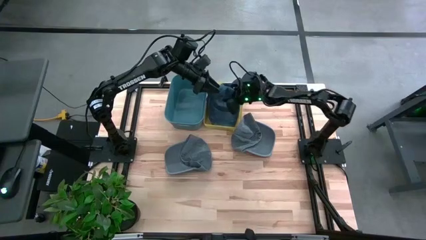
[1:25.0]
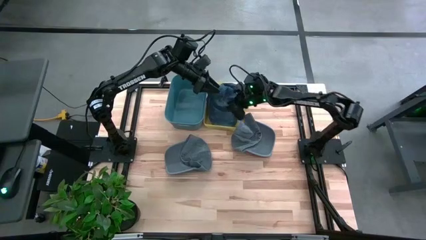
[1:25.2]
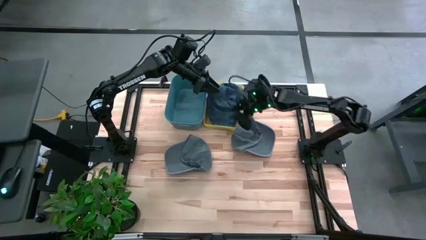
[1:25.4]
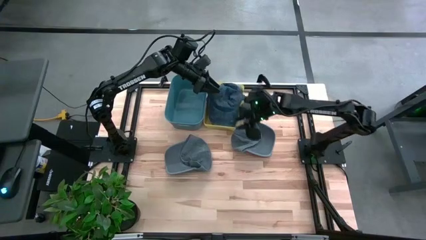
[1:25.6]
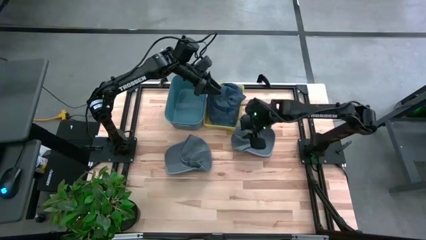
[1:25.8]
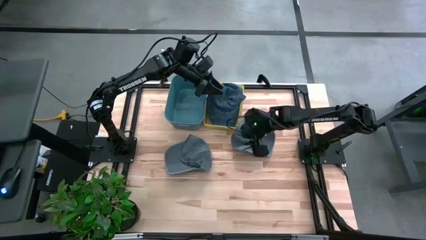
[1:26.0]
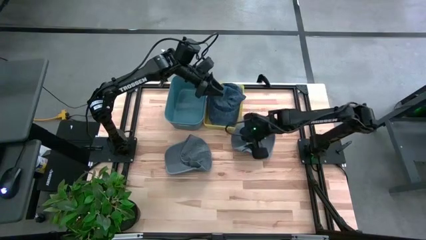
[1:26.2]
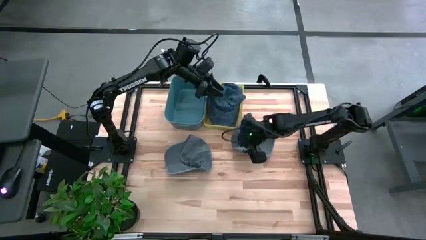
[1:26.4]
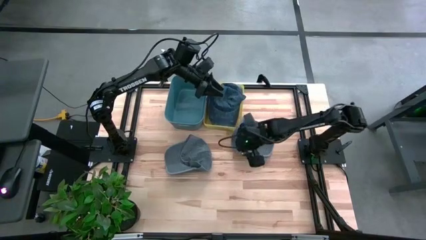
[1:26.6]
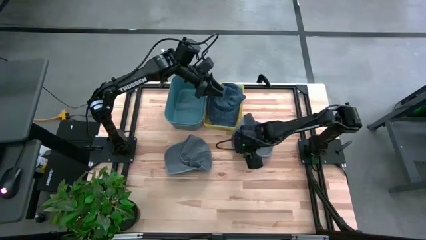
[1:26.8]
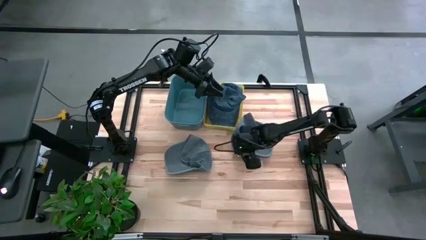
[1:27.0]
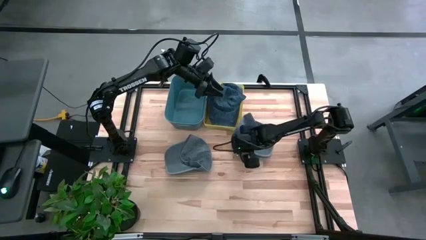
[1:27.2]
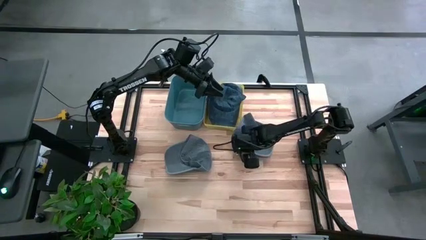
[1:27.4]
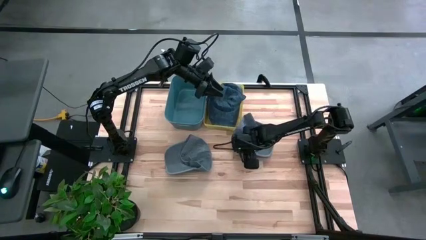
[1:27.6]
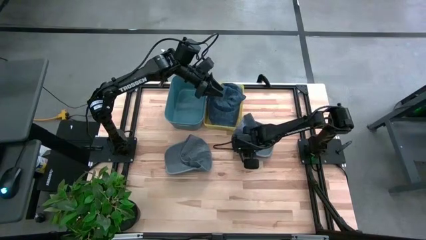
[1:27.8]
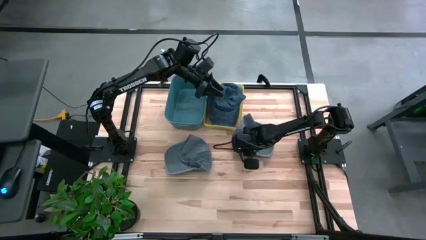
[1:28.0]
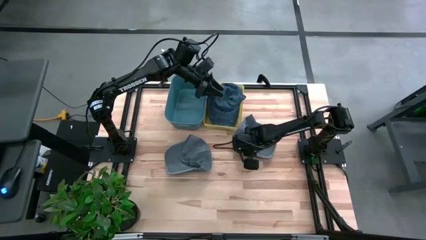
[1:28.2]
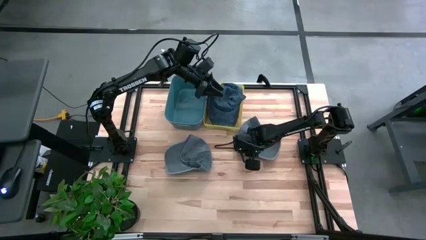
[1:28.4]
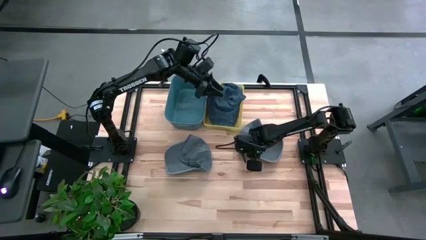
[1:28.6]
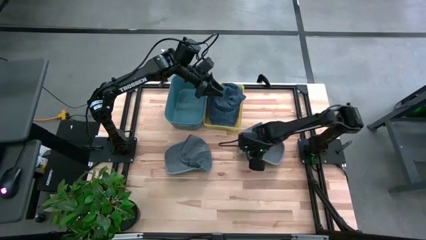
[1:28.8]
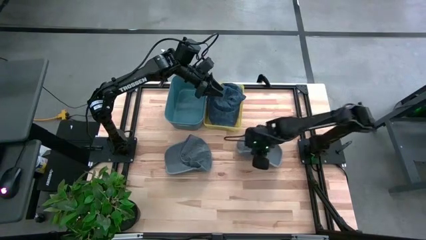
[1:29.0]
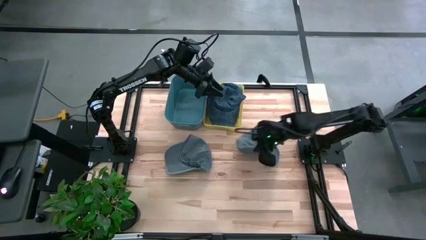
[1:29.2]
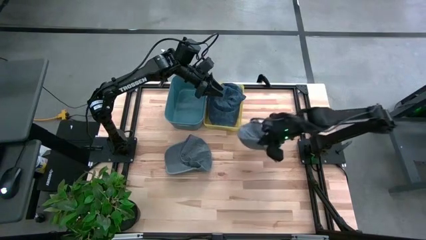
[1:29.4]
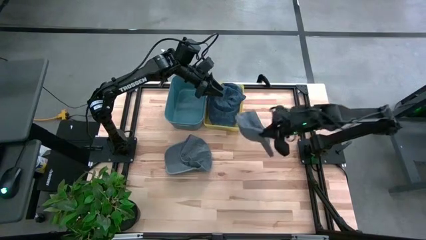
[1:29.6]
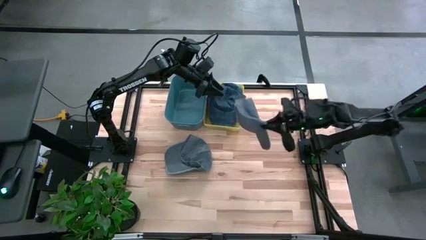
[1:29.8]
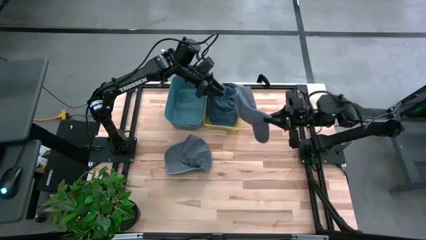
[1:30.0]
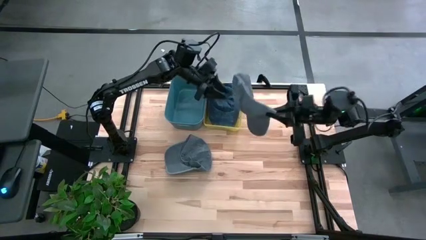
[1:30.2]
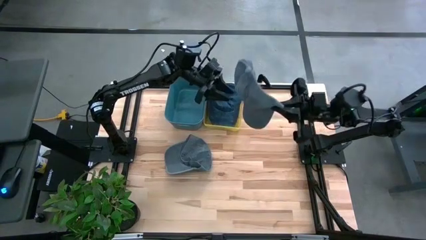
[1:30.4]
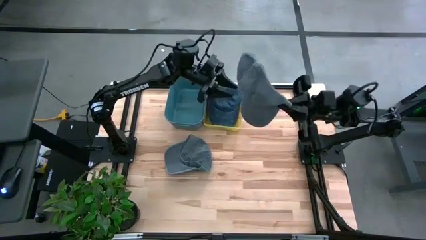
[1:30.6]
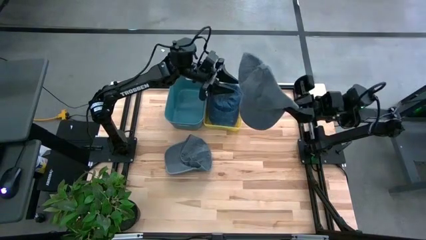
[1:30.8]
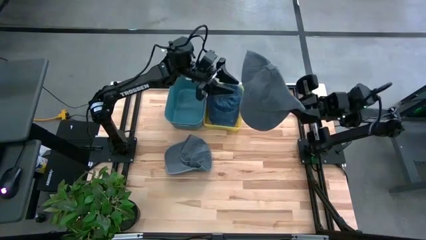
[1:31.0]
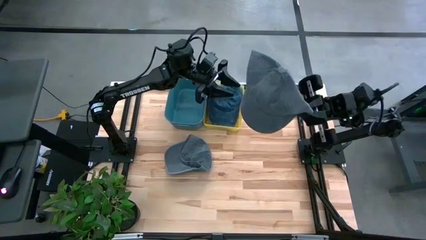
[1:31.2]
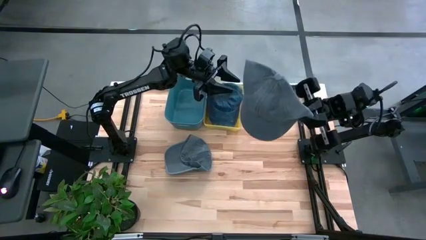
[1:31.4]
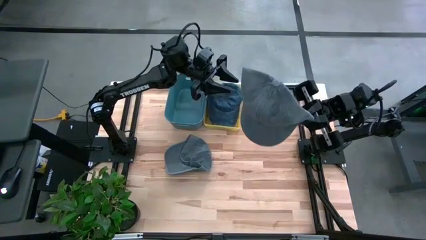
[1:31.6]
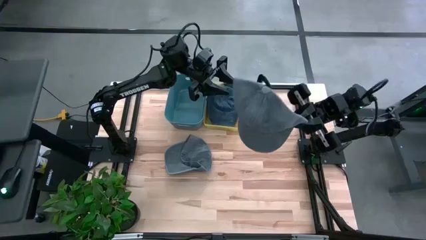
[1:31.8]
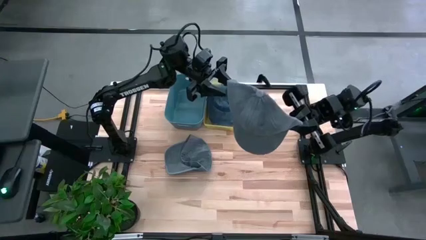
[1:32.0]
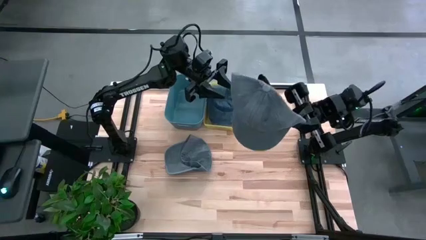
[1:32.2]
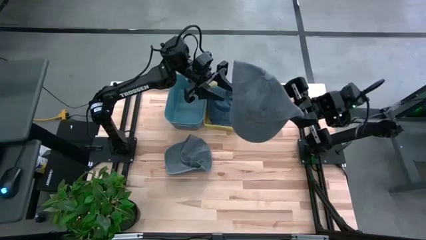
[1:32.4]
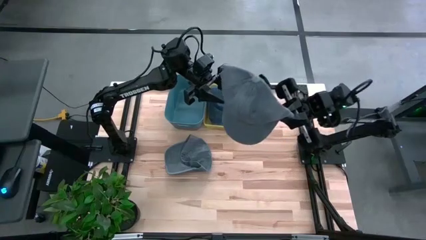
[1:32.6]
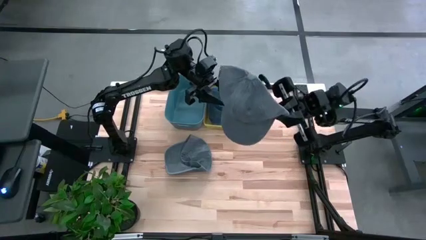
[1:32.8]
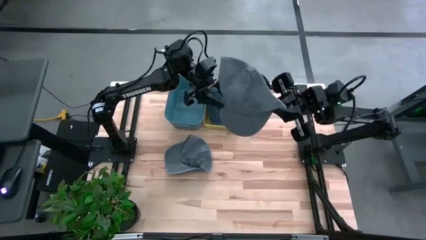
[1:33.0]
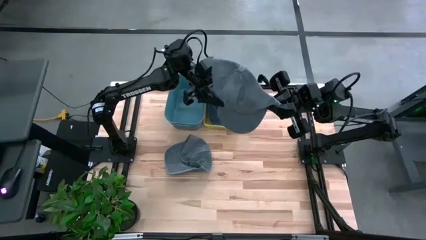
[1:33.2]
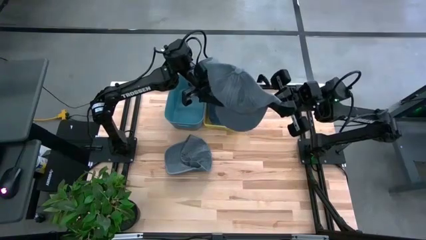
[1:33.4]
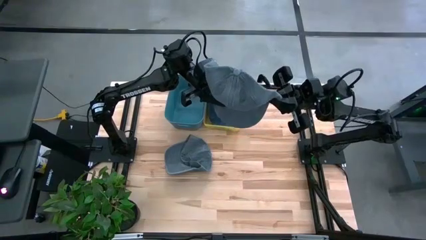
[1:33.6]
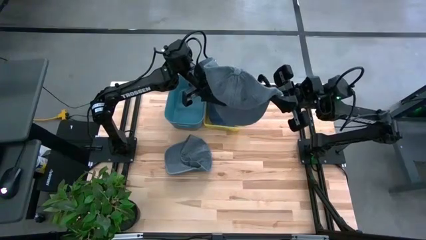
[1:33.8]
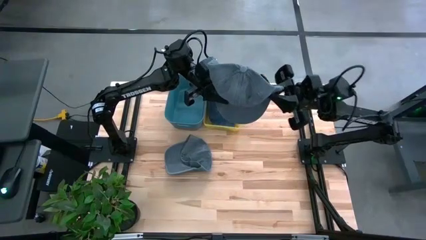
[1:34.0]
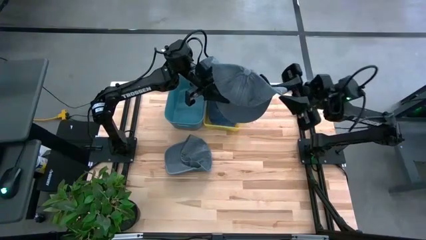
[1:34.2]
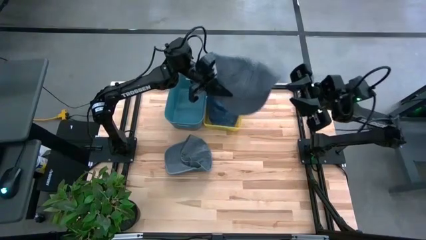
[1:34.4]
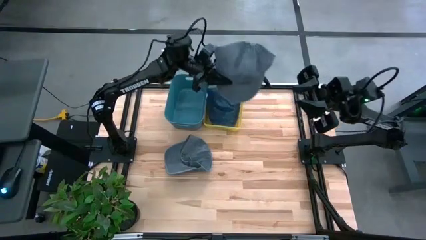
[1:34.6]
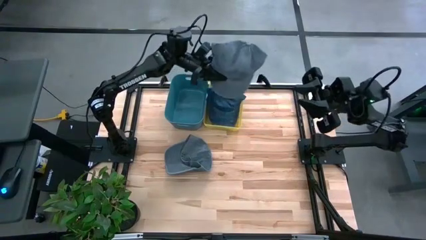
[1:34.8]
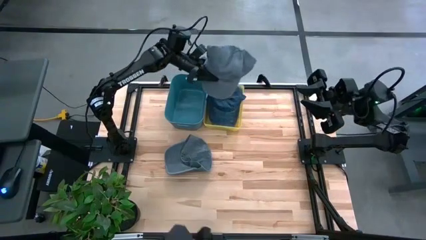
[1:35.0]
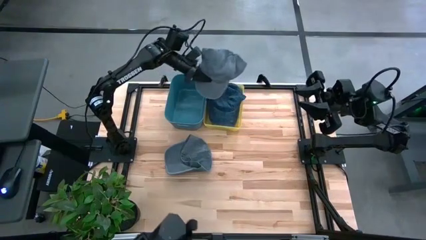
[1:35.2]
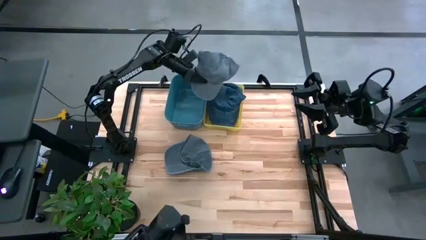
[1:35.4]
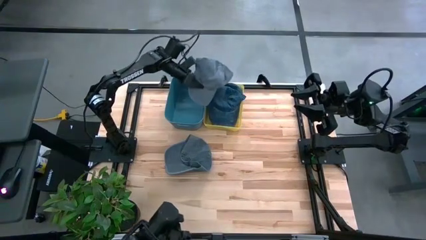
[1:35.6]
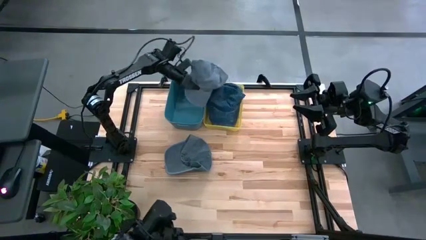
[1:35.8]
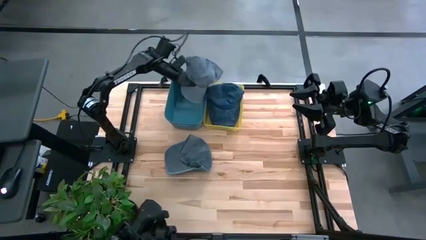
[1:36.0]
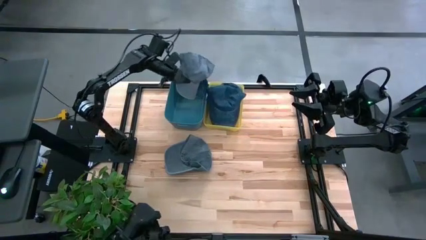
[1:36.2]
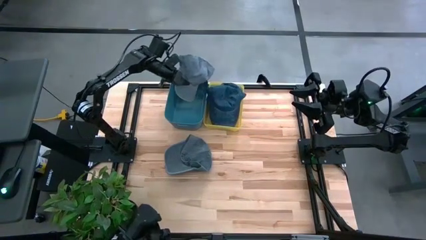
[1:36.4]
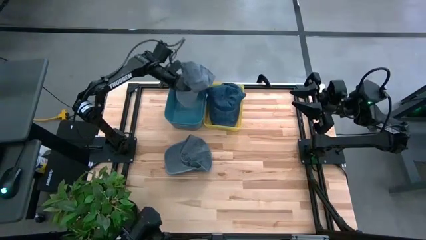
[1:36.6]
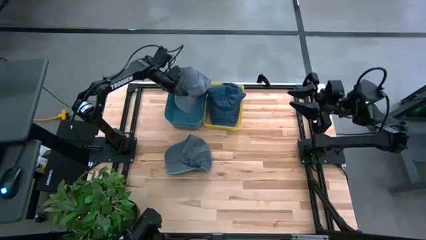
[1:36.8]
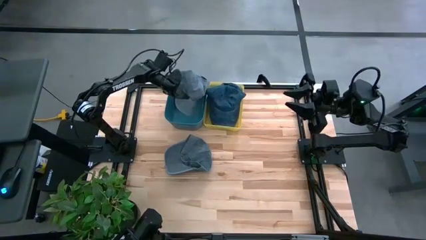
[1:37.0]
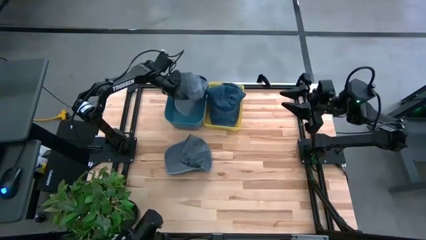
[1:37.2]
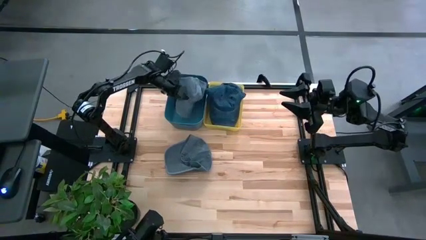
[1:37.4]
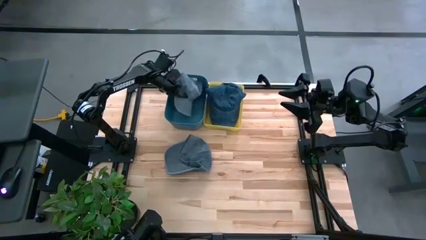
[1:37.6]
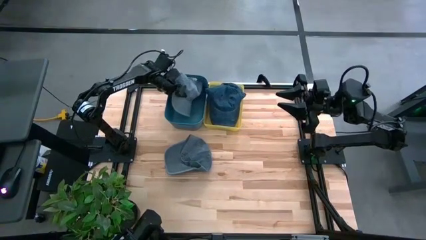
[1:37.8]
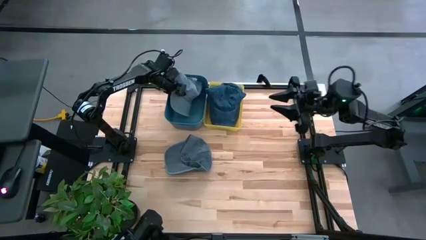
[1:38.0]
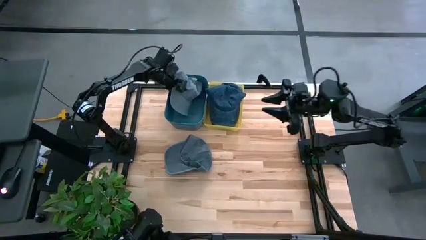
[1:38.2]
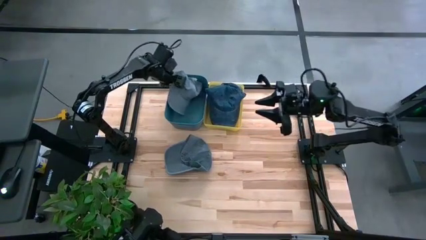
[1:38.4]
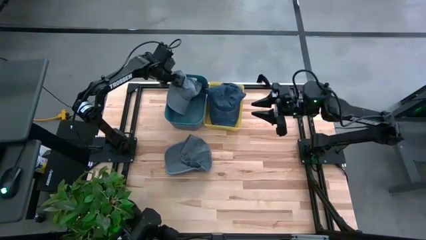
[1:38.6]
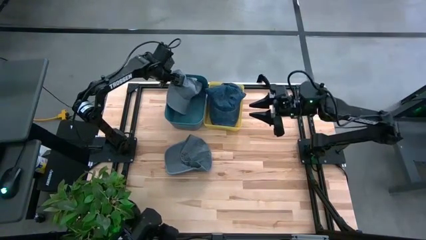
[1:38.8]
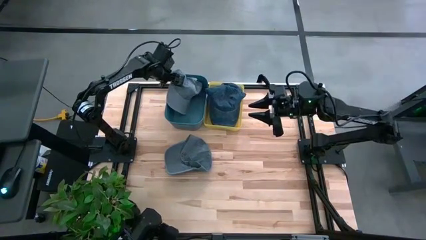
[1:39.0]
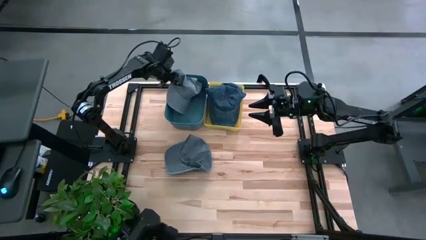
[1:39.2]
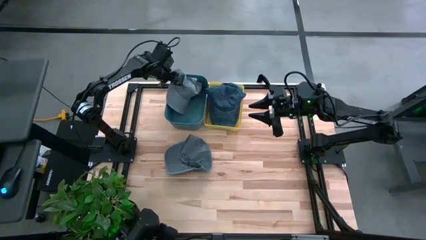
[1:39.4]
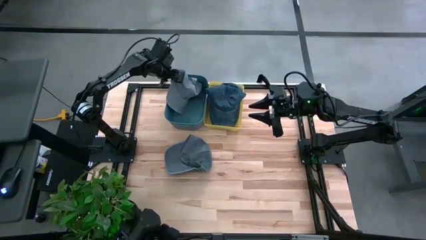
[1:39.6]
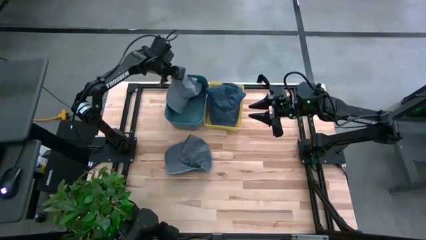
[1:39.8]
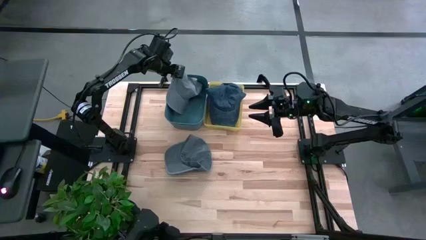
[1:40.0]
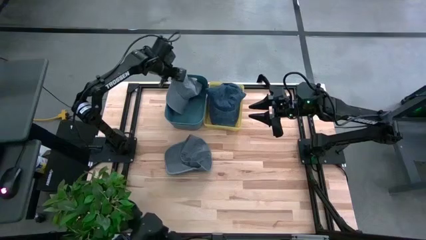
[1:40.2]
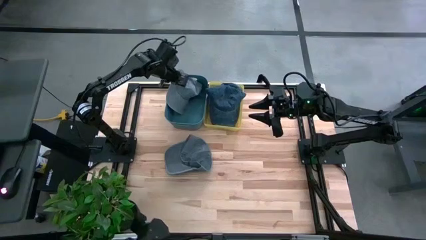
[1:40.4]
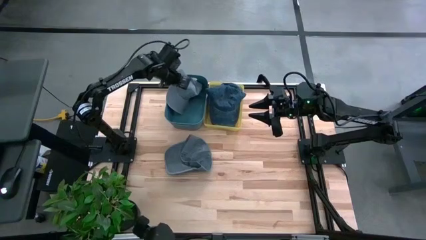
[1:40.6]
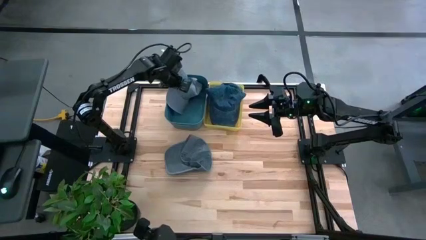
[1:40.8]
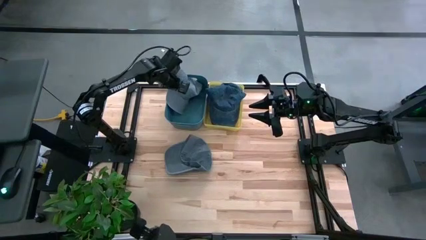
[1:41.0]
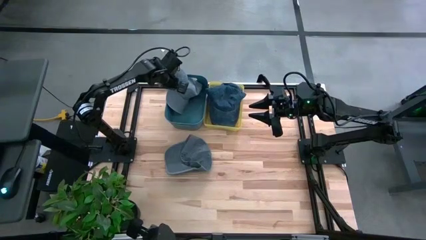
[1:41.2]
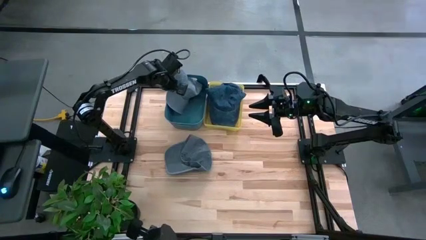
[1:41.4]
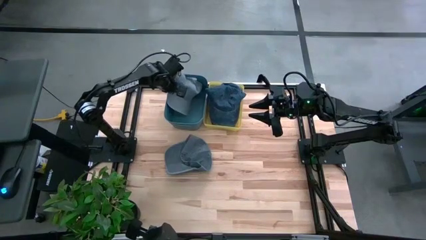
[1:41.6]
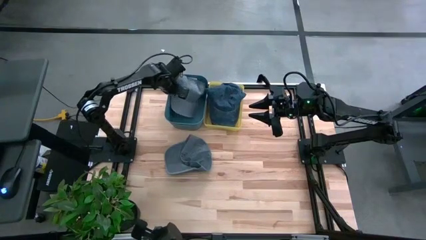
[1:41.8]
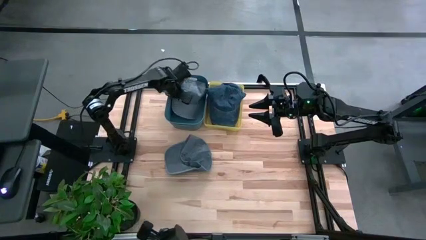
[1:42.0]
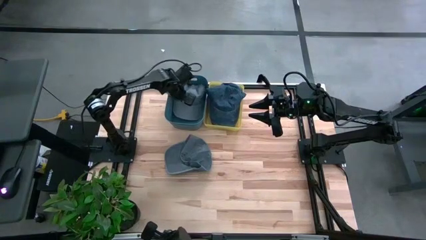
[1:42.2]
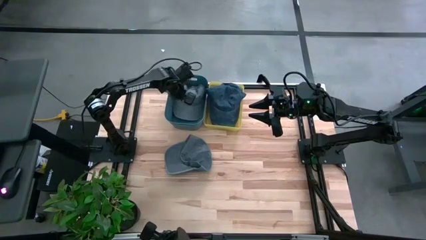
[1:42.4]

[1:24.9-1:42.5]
Task: Pick & Place hat
Put the right gray cap into the blue bin
